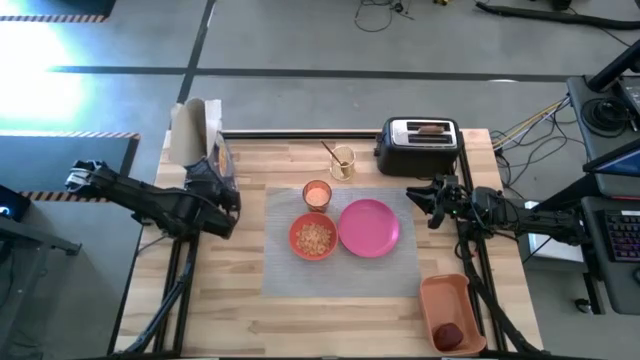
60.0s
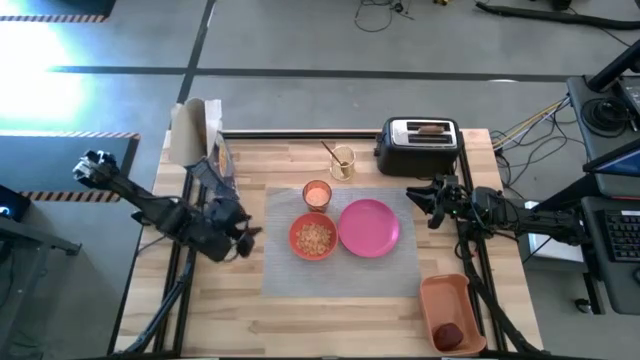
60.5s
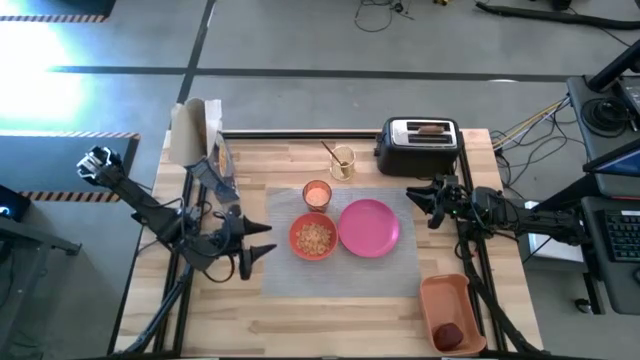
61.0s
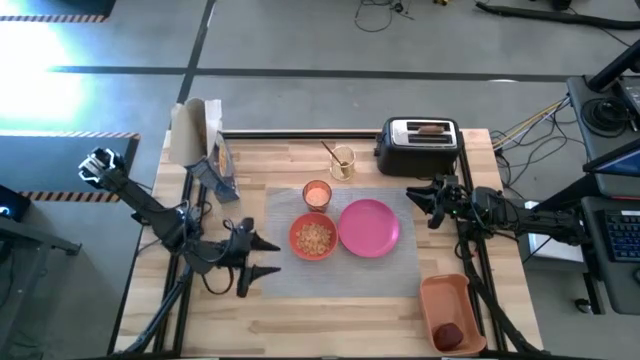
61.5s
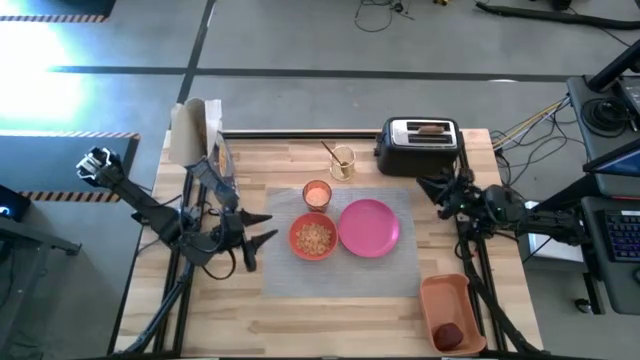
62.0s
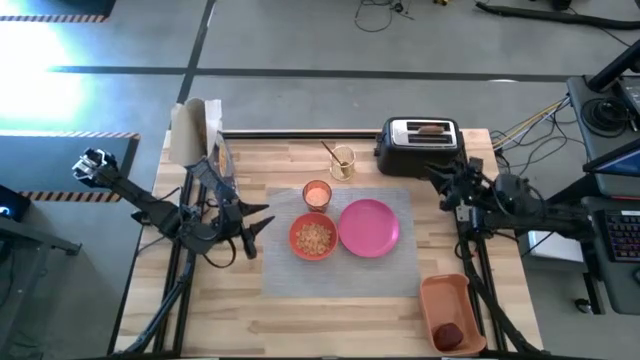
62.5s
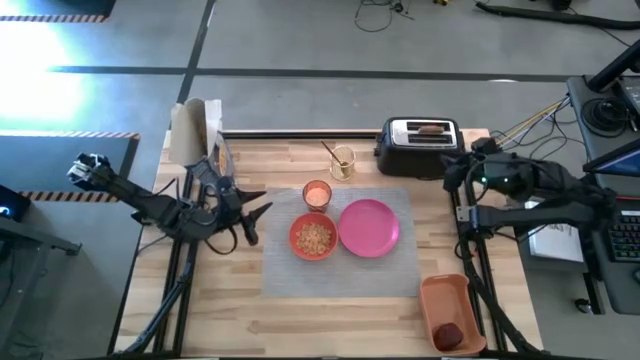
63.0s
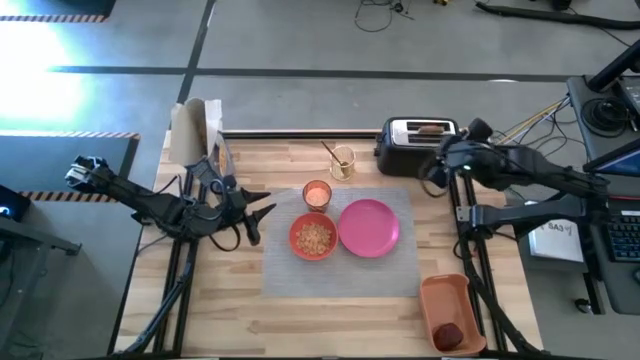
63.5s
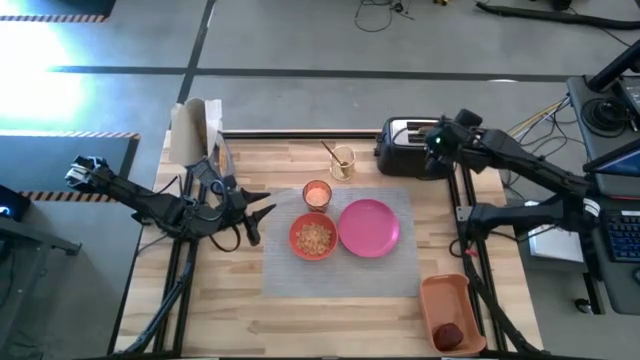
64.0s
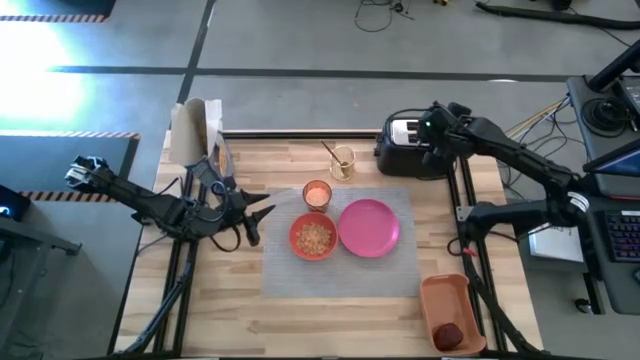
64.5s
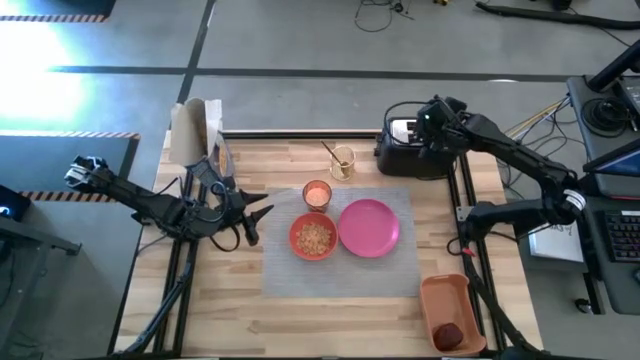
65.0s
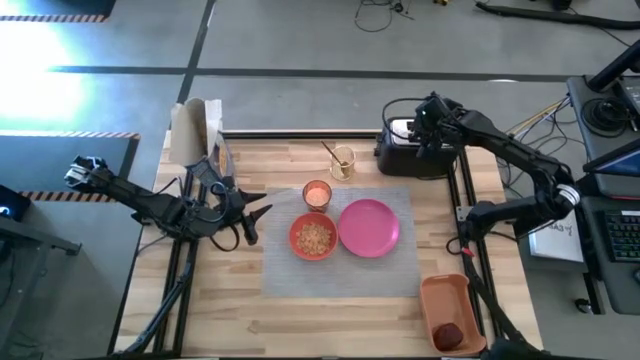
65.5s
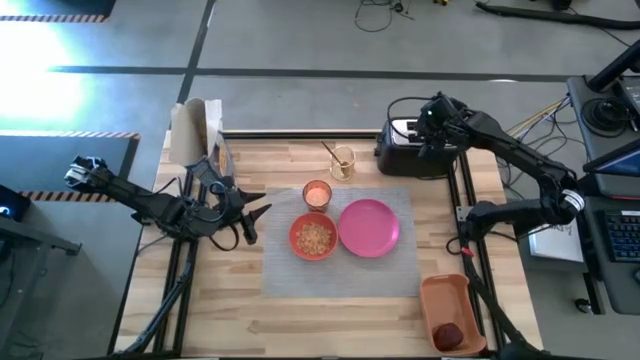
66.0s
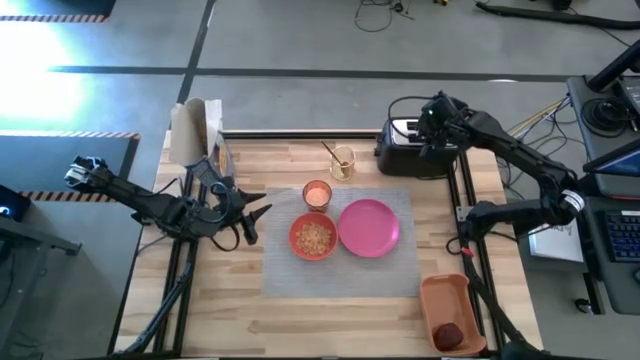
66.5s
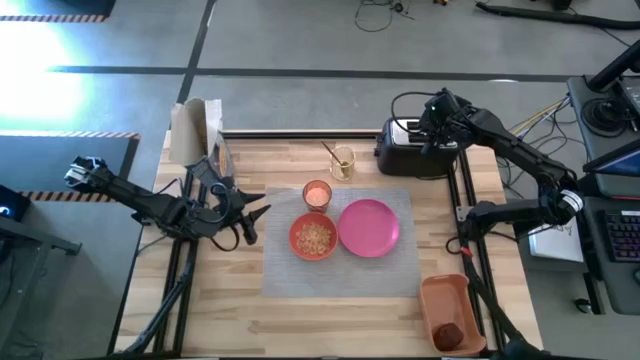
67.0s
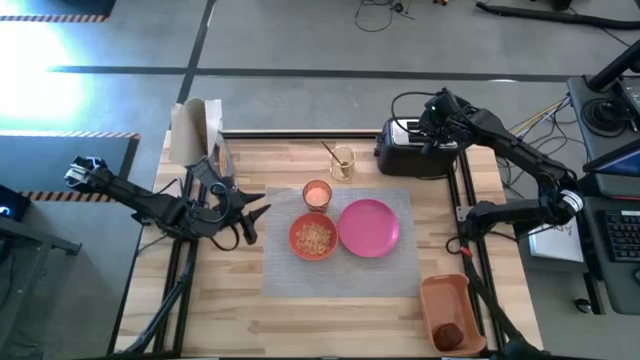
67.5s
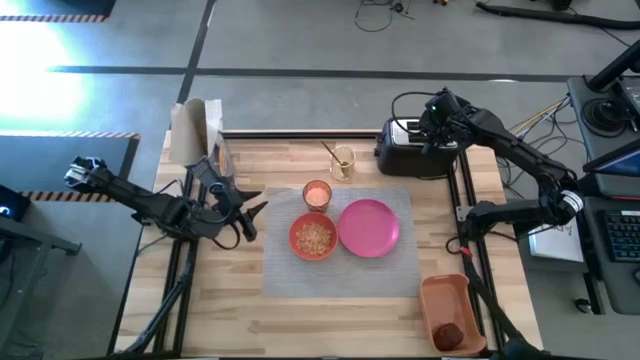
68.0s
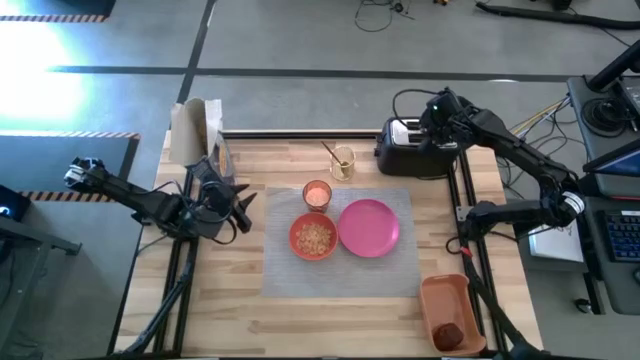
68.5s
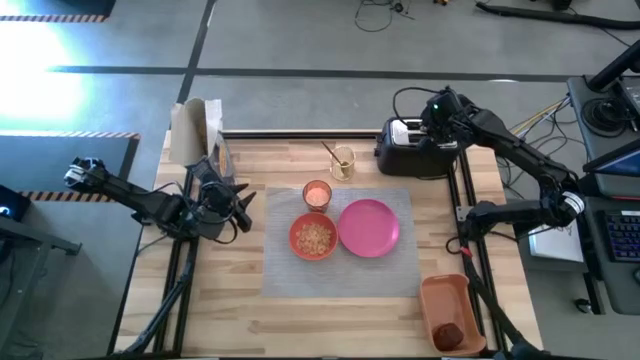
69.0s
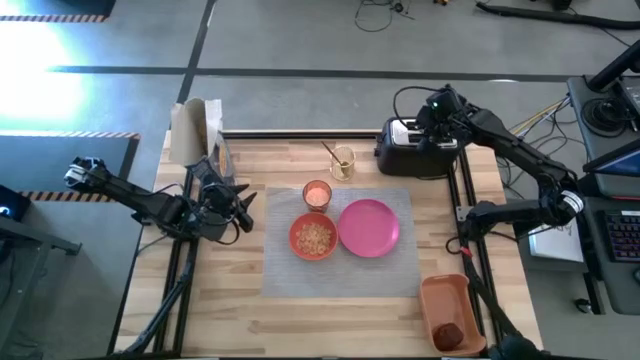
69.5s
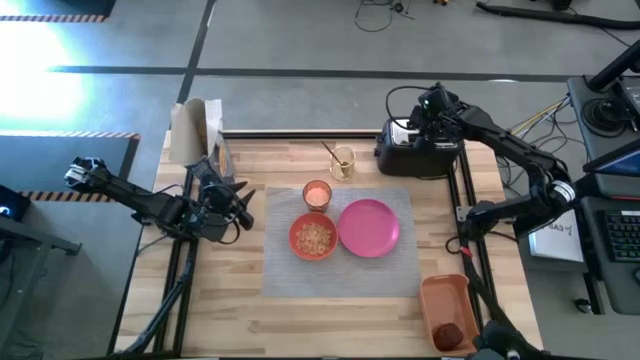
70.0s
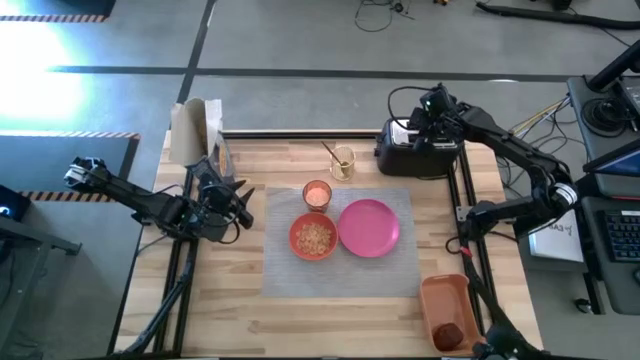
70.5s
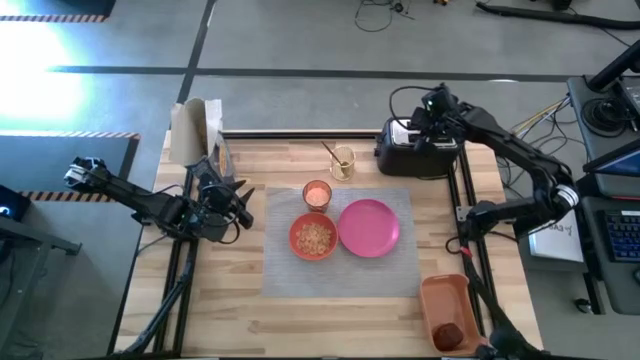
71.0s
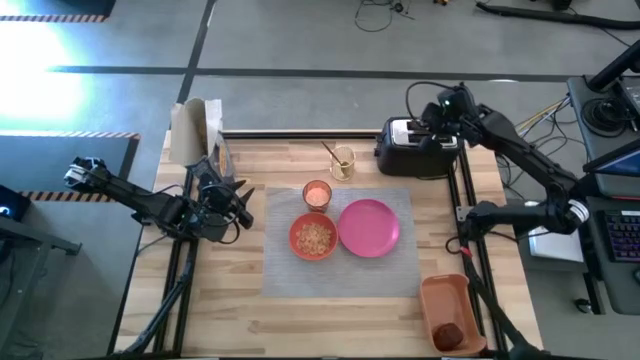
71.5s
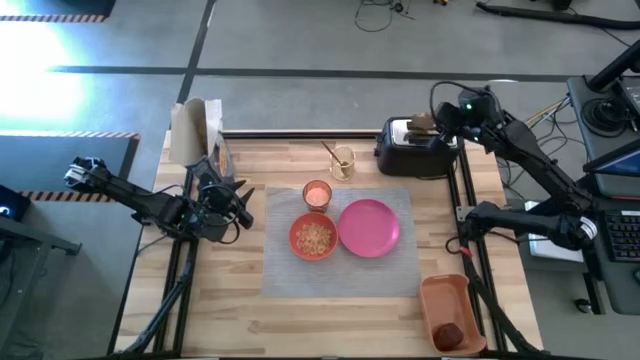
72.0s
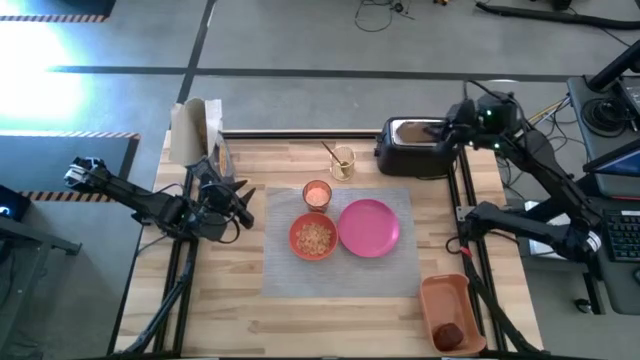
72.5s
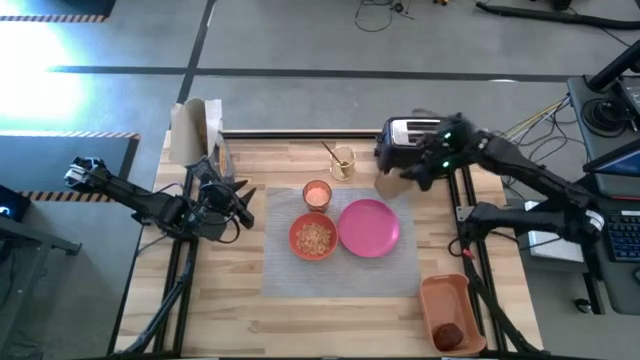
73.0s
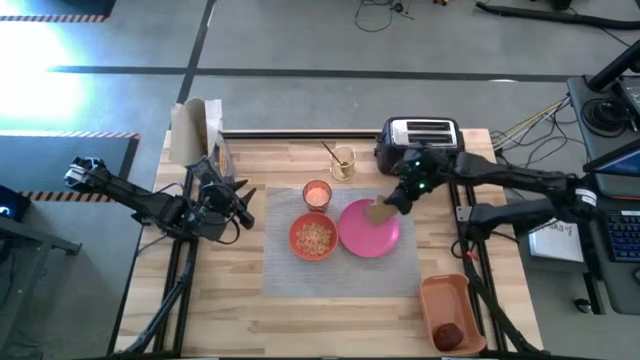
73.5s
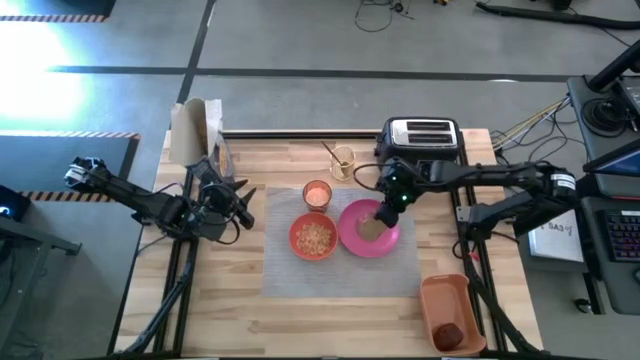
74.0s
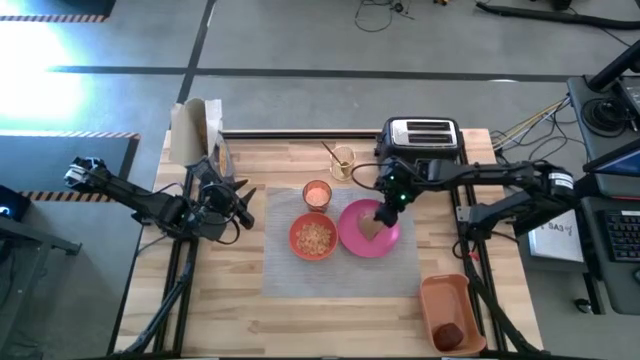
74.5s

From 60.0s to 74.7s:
Task: Arrange a breakfast setting
Put the toasted bread on the pink plate

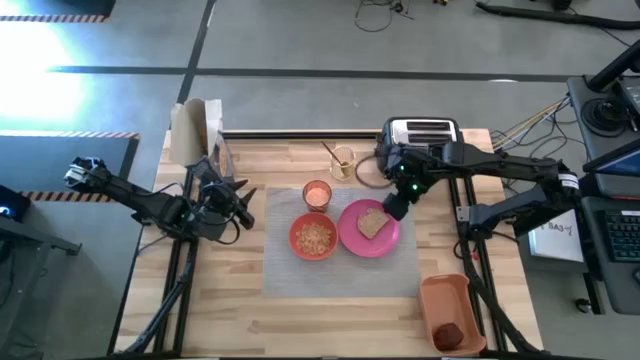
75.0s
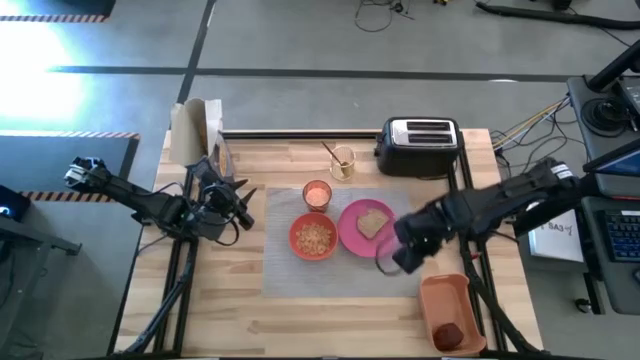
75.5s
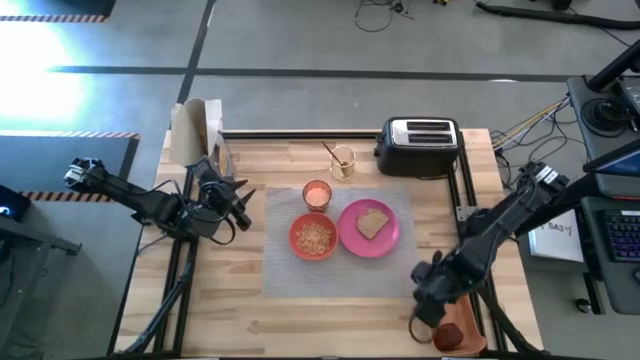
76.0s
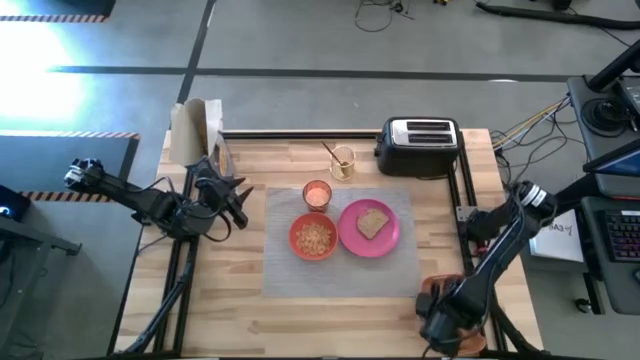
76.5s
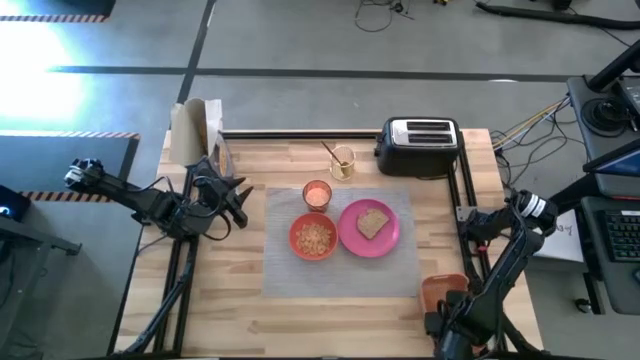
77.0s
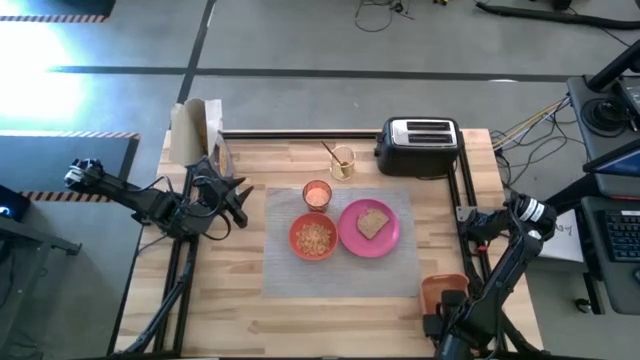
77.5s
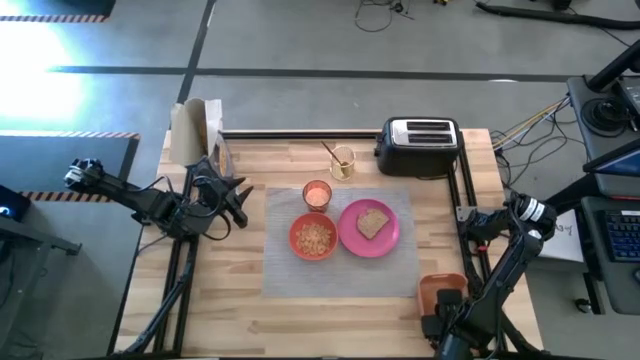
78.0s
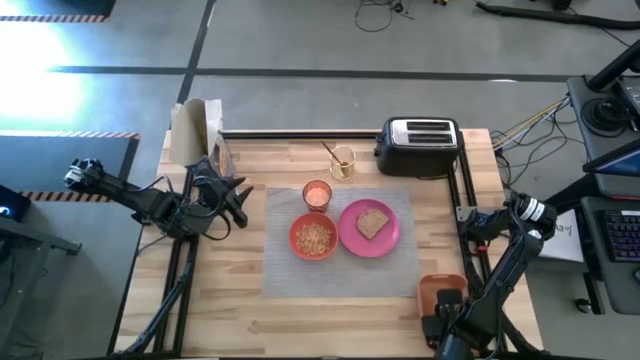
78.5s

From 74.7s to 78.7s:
Put the red apple on the gray tablemat to the top right of the orange bowl

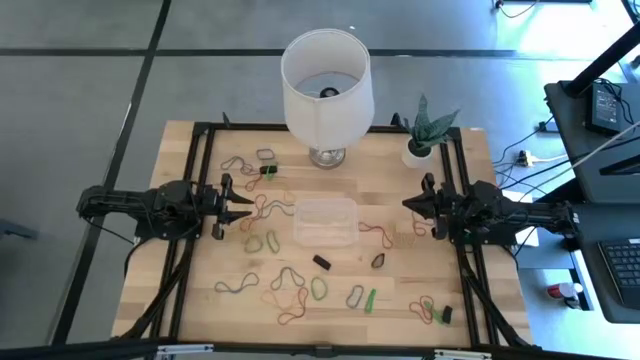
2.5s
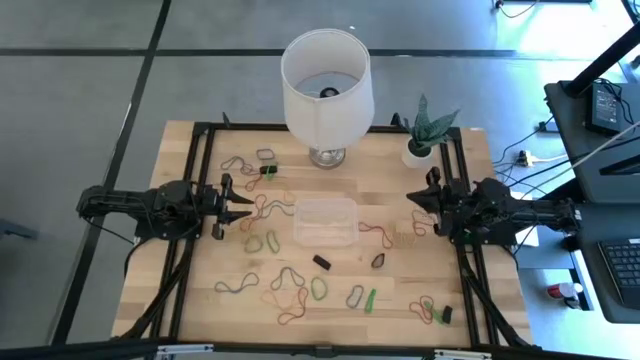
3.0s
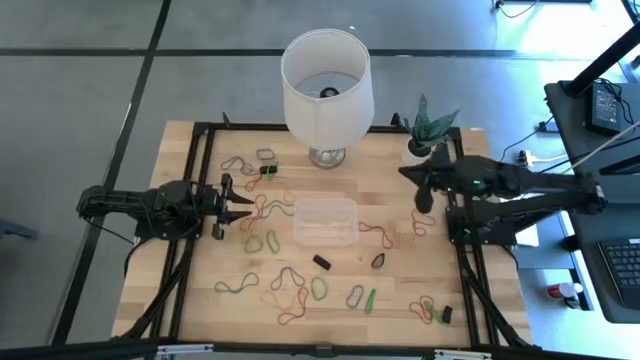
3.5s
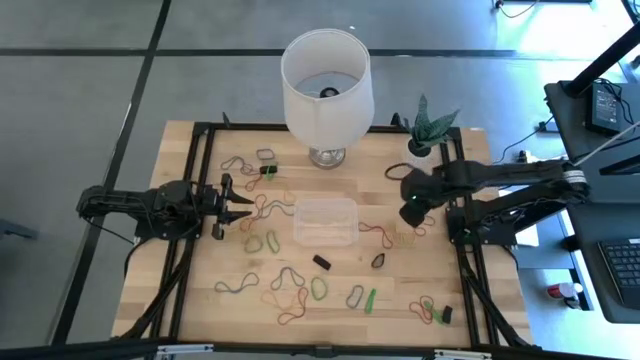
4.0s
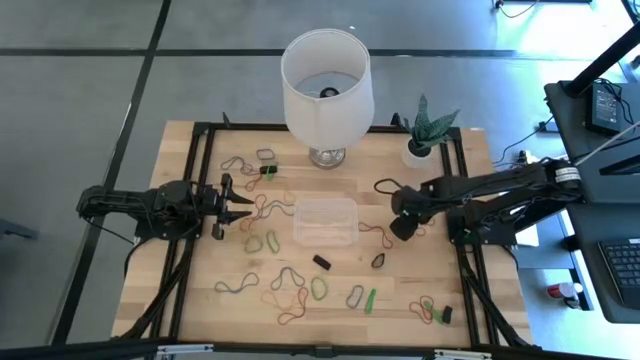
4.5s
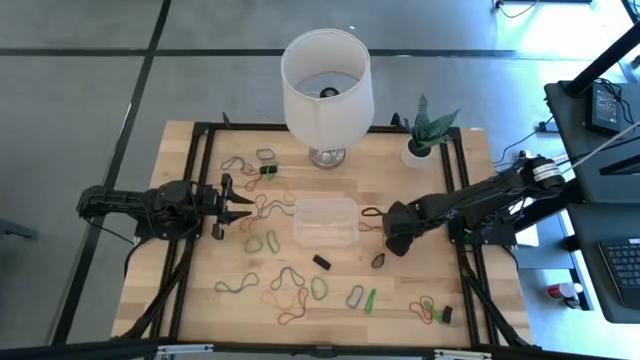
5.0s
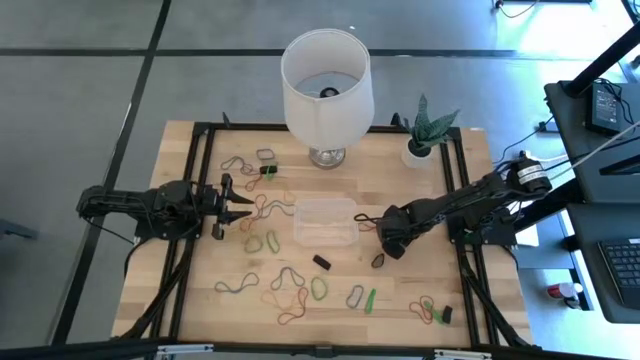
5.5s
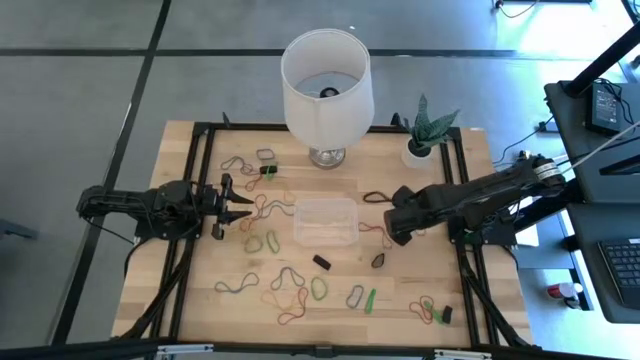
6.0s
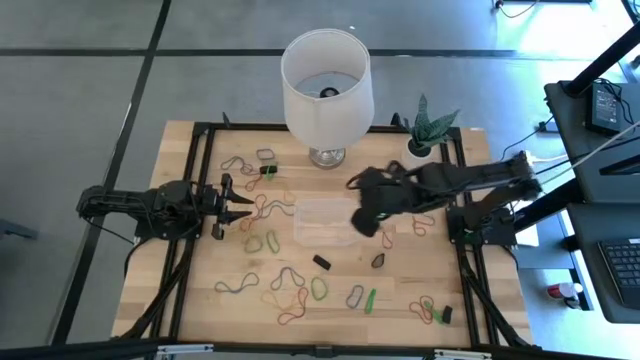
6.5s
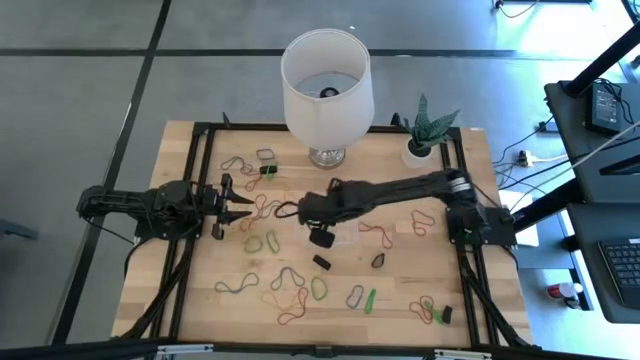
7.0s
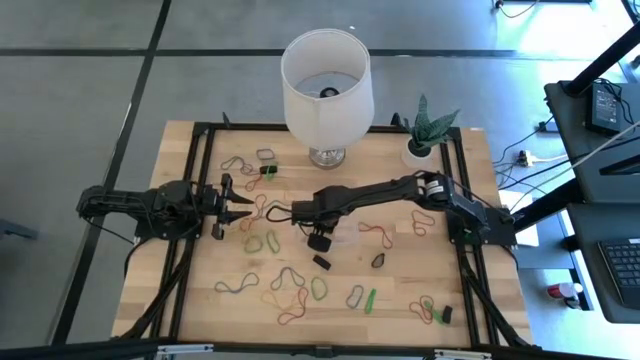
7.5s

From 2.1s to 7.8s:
Task: Pick and place rubber bands into bin
Put the yellow rubber band into the container
